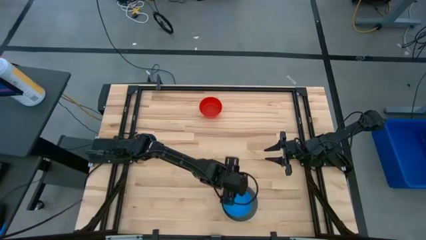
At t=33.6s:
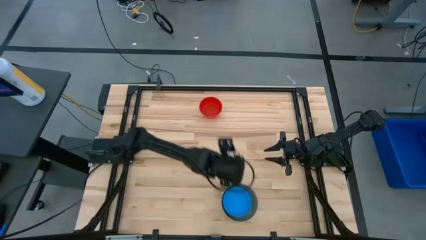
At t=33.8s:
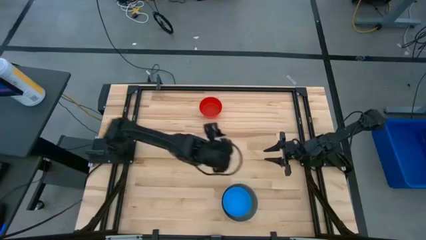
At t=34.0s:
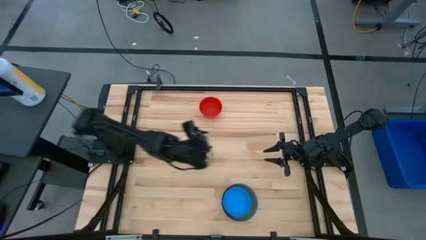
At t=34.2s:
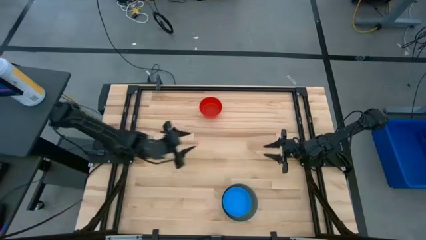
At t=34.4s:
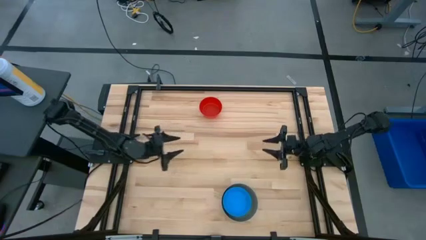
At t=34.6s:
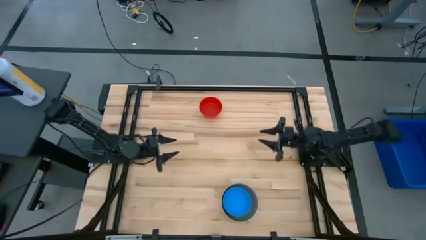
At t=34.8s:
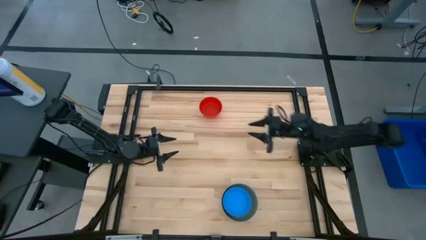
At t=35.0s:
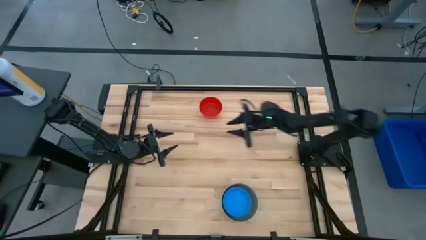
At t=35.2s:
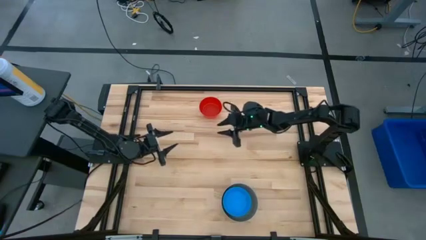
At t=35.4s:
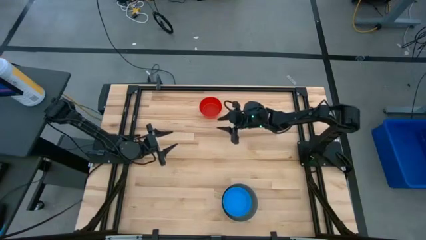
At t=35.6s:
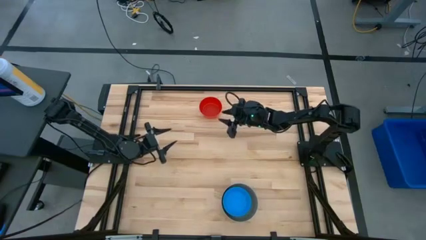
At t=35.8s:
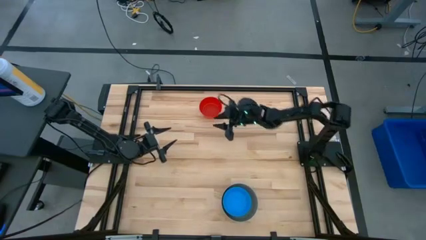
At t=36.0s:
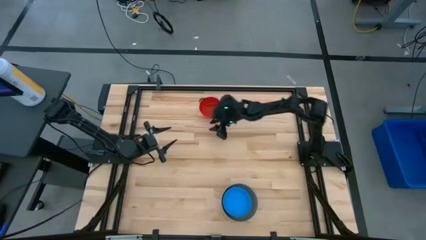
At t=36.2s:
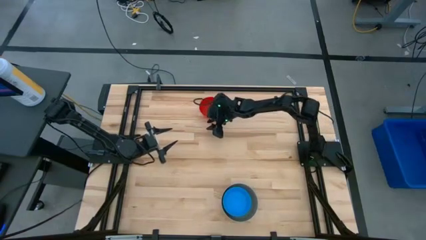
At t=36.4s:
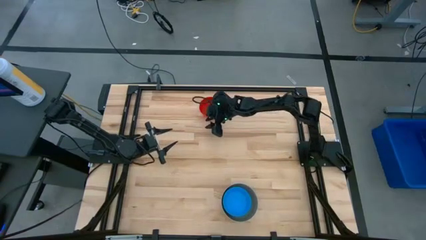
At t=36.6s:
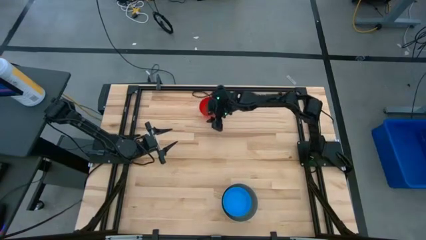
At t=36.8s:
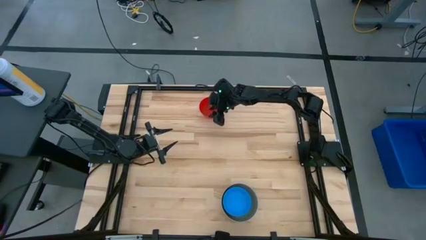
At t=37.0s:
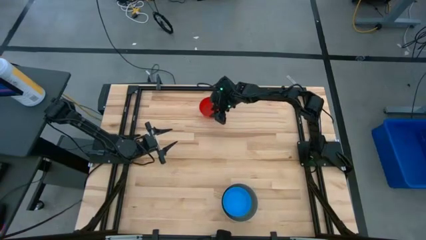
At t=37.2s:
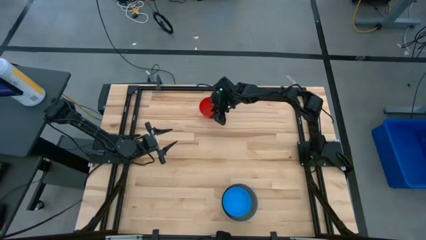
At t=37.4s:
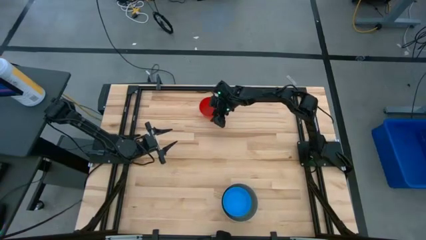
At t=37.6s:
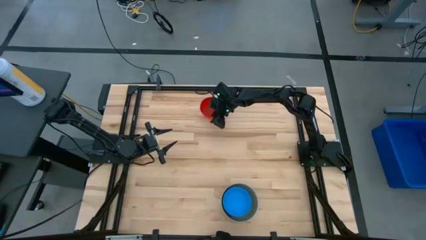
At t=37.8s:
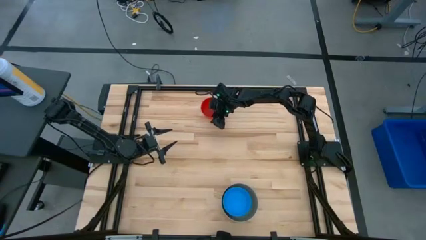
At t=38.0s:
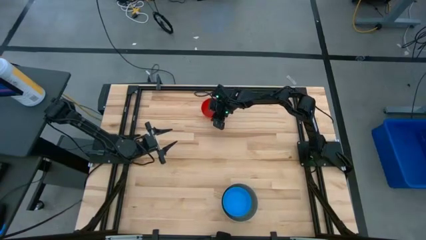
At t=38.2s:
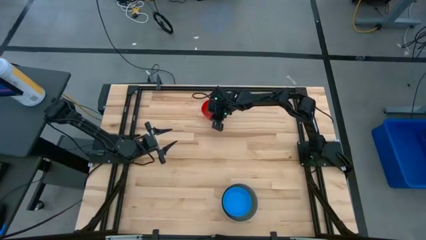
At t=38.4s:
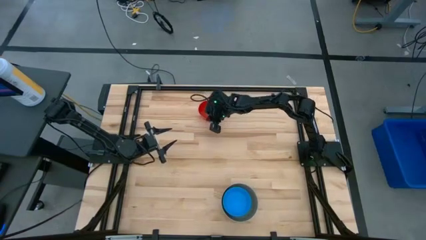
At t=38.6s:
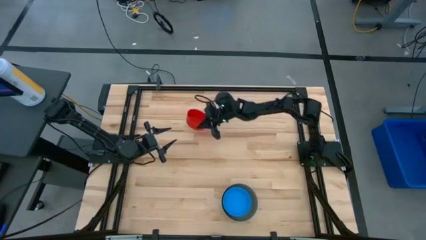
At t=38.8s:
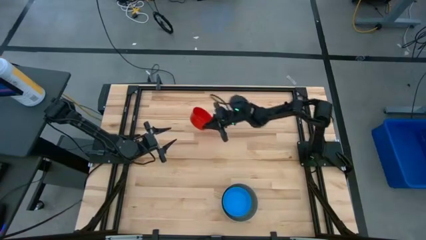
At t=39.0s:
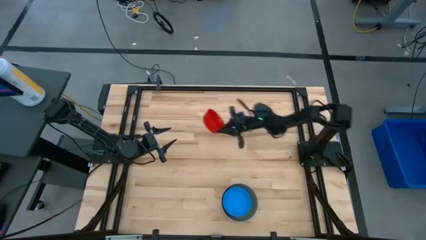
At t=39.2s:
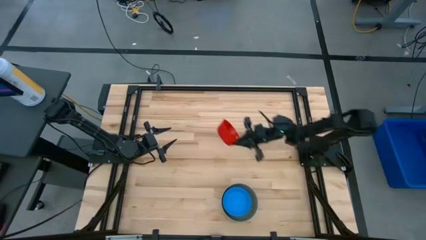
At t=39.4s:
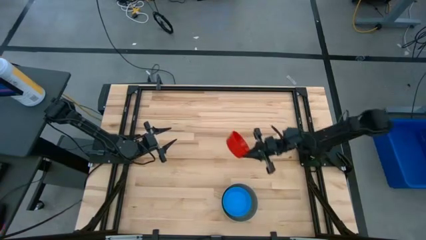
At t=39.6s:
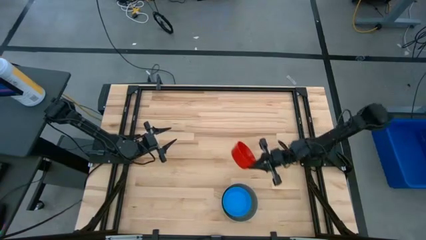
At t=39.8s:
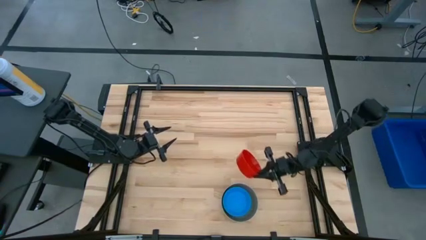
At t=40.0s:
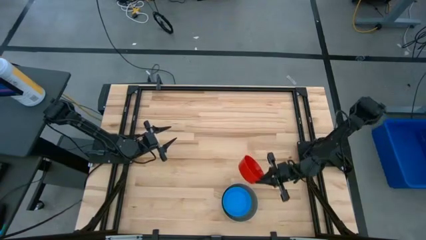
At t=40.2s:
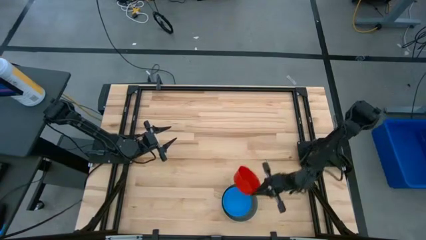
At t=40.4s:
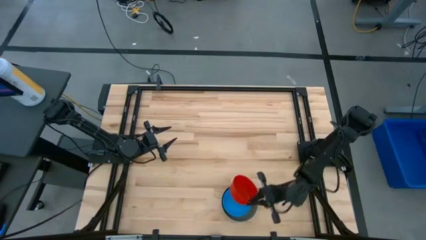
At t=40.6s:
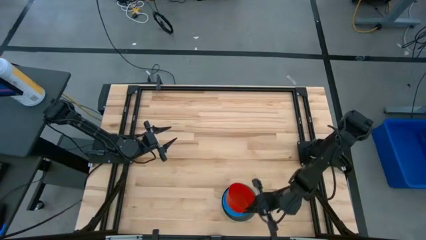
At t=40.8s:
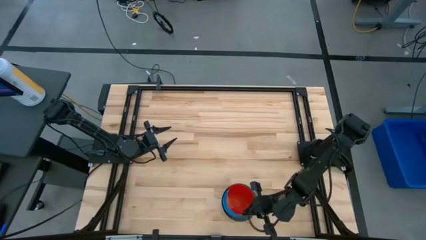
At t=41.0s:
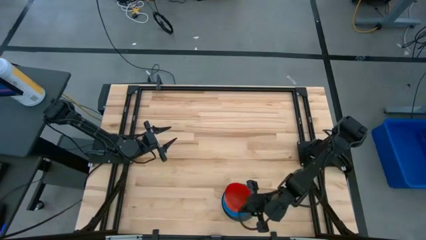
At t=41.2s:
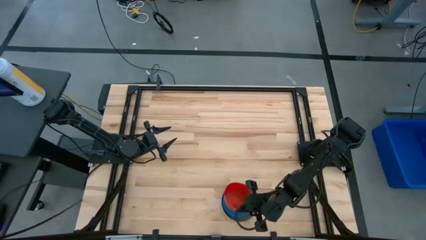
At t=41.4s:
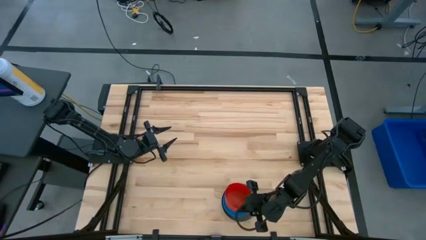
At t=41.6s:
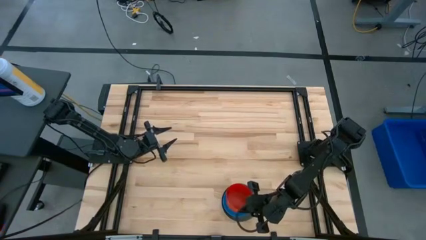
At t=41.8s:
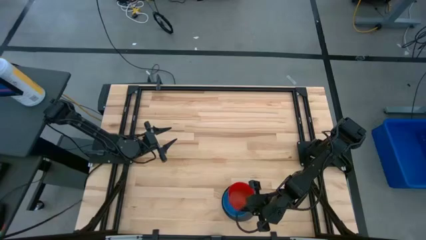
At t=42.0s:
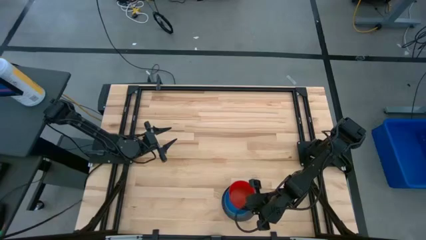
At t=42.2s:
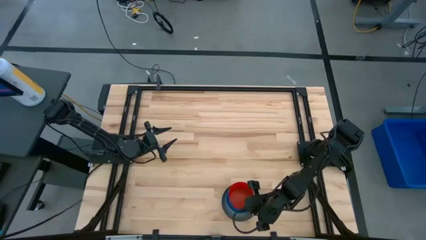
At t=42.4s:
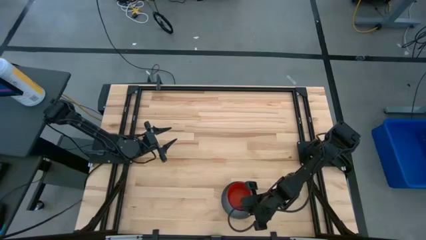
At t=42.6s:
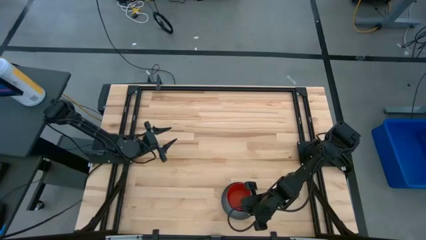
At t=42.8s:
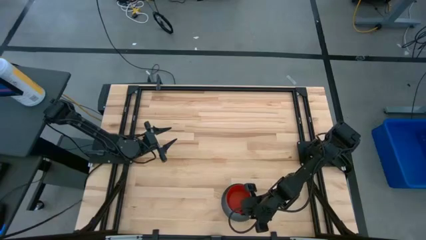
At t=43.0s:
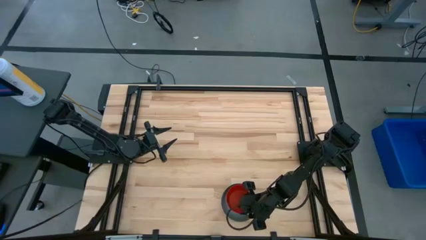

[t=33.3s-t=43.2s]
Stack the red bowl on the light blue bowl
